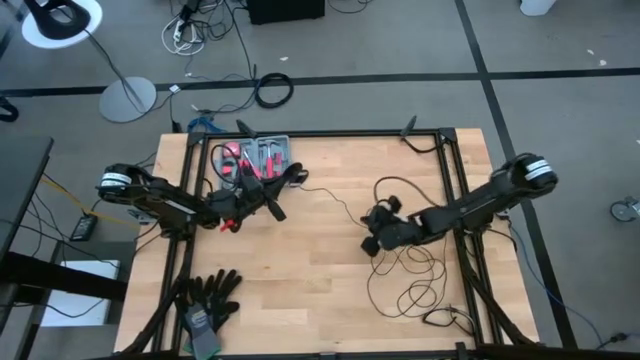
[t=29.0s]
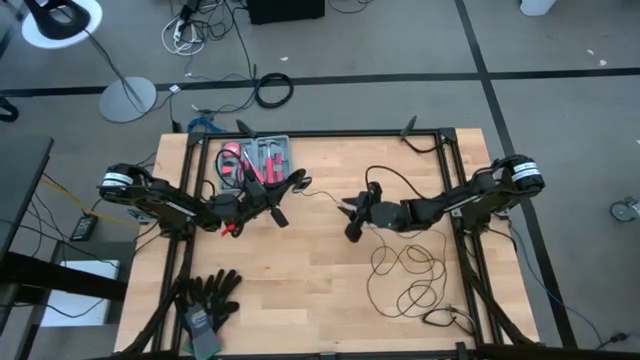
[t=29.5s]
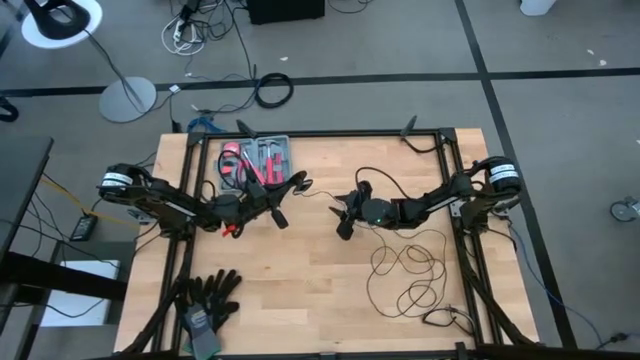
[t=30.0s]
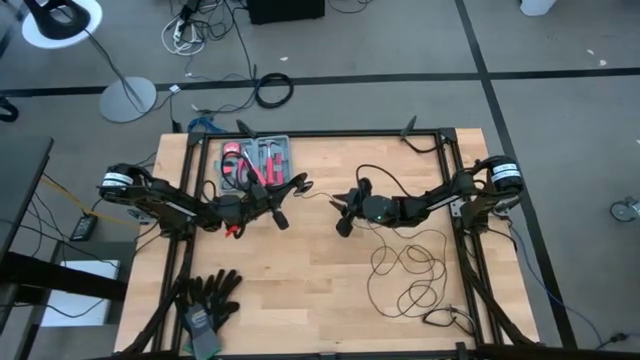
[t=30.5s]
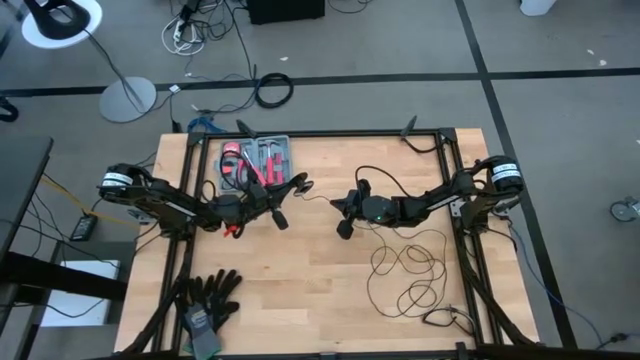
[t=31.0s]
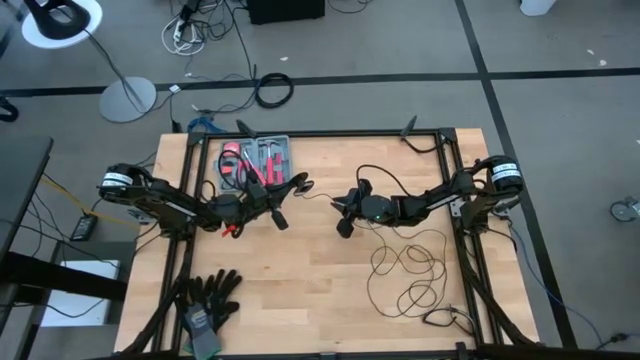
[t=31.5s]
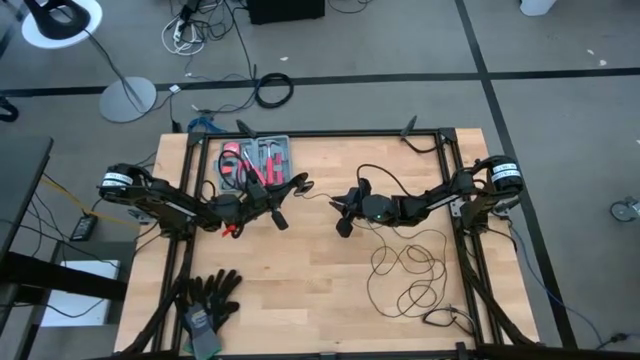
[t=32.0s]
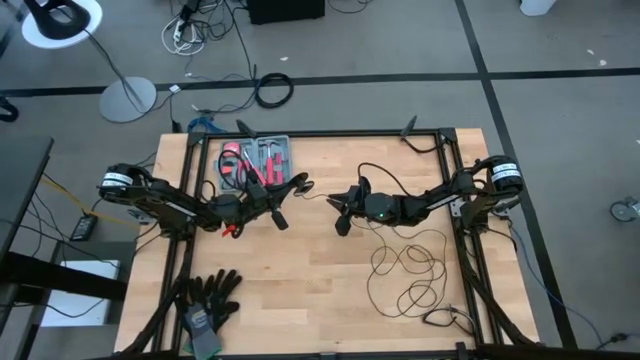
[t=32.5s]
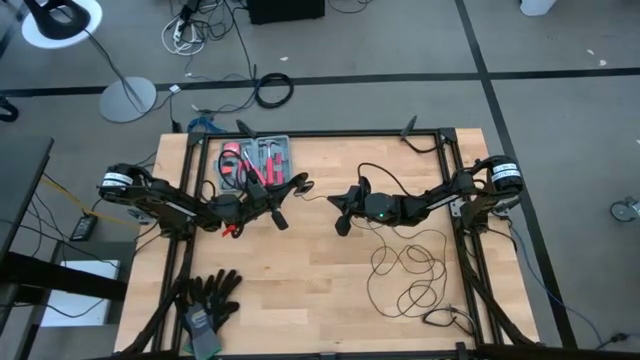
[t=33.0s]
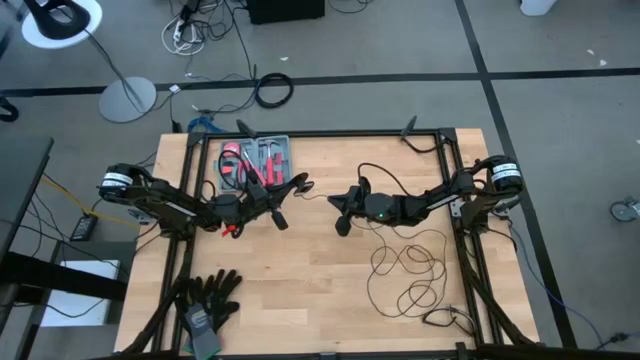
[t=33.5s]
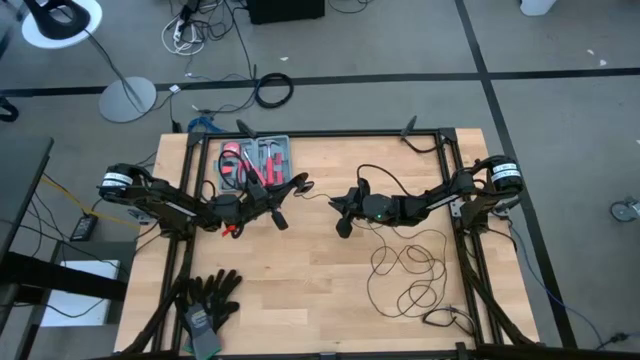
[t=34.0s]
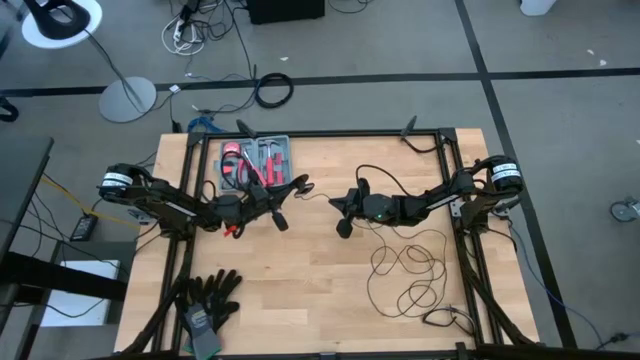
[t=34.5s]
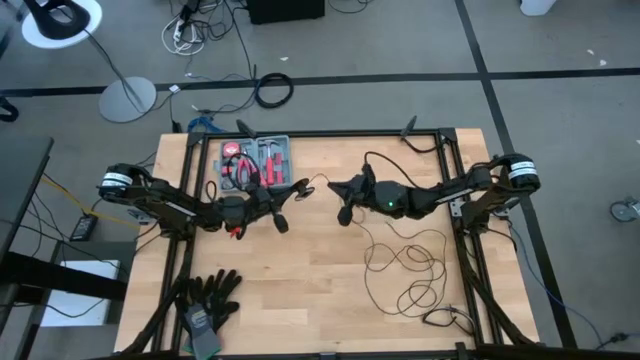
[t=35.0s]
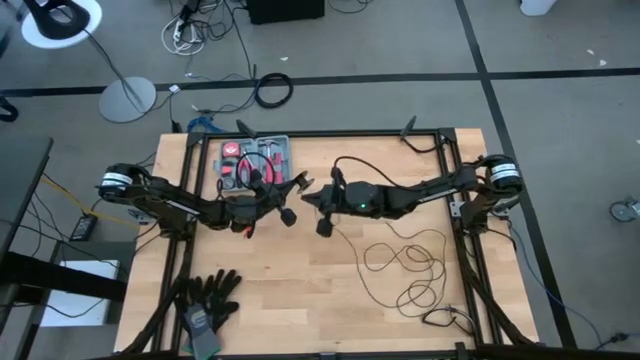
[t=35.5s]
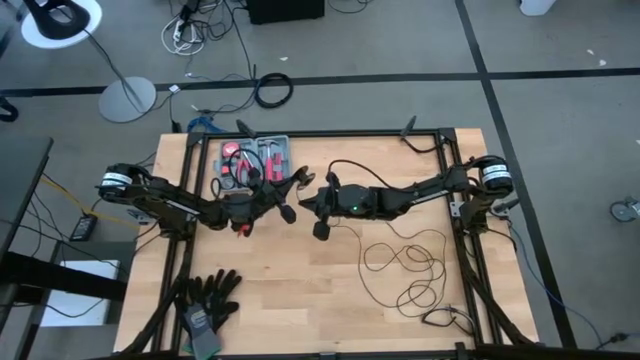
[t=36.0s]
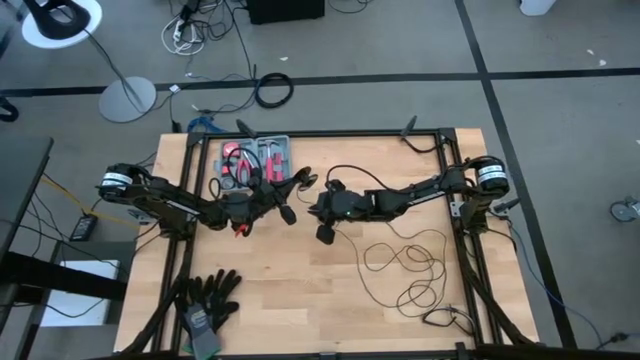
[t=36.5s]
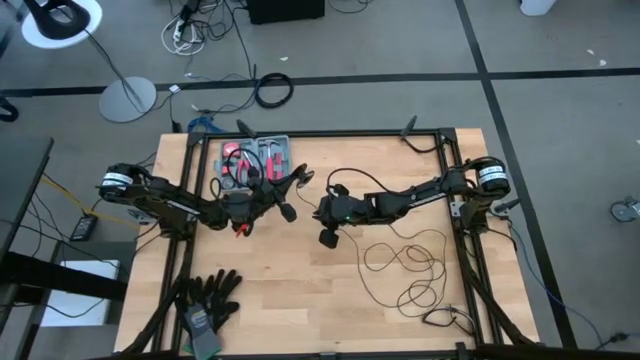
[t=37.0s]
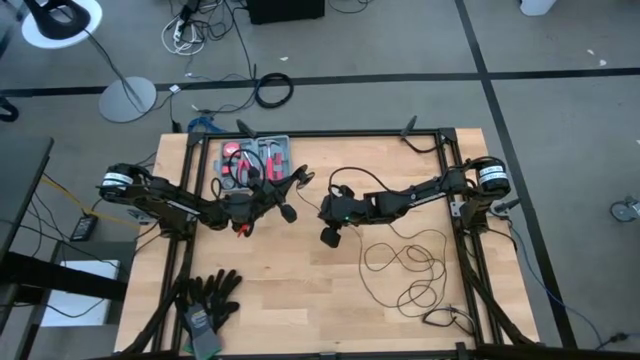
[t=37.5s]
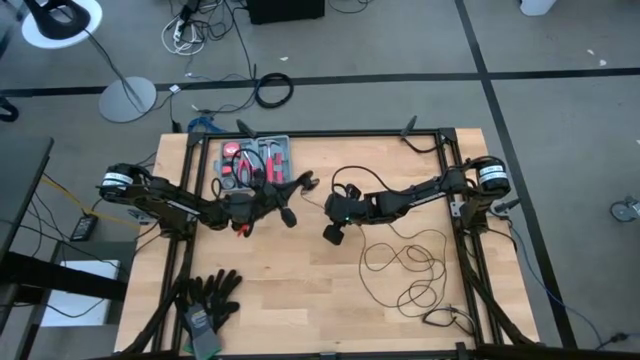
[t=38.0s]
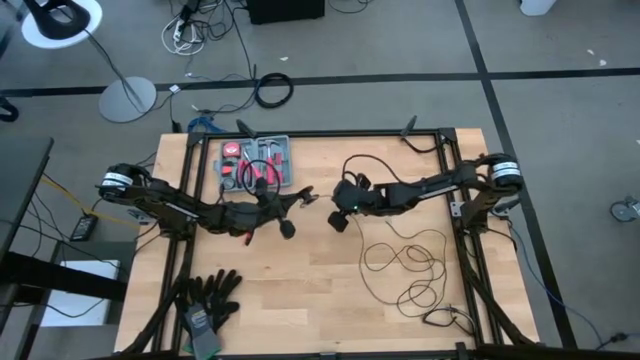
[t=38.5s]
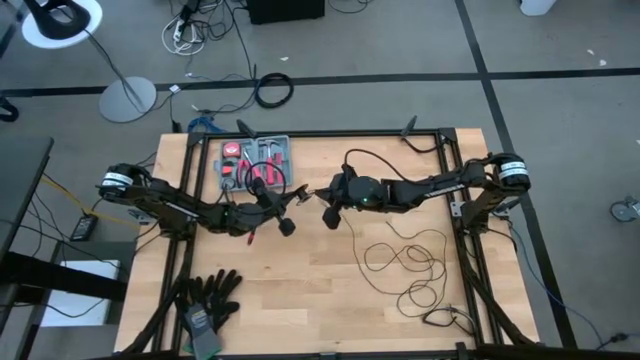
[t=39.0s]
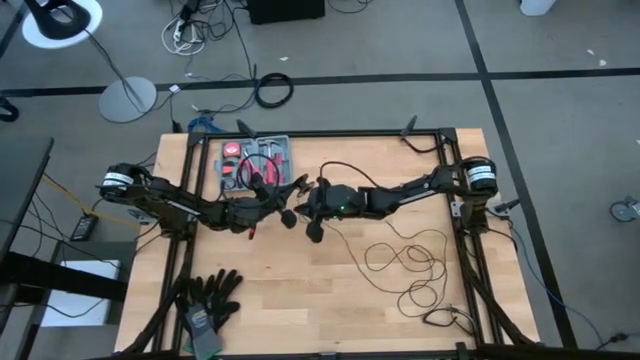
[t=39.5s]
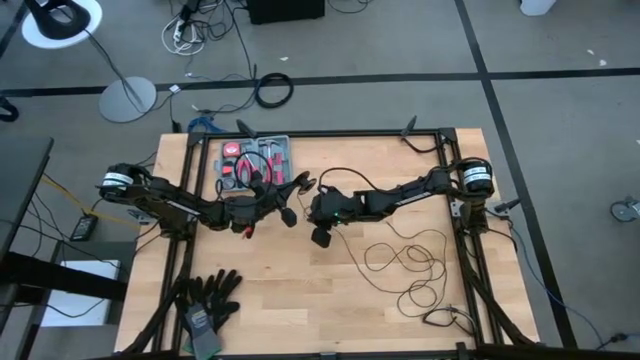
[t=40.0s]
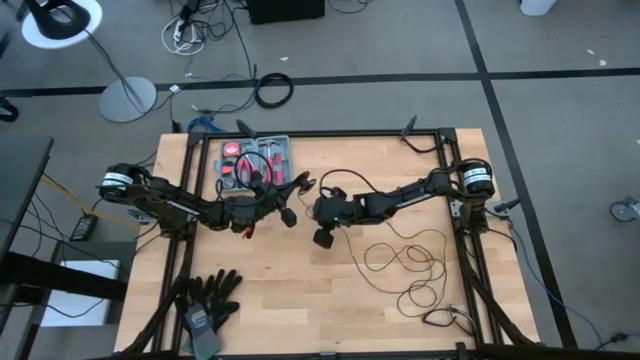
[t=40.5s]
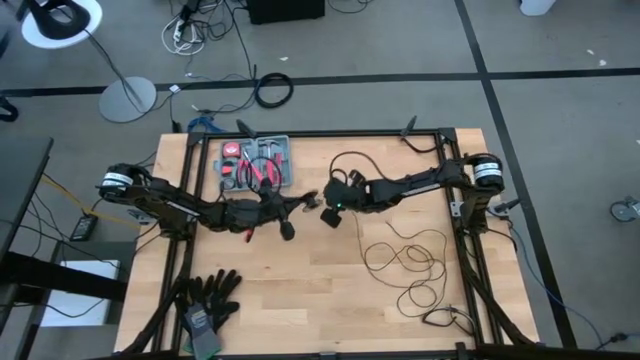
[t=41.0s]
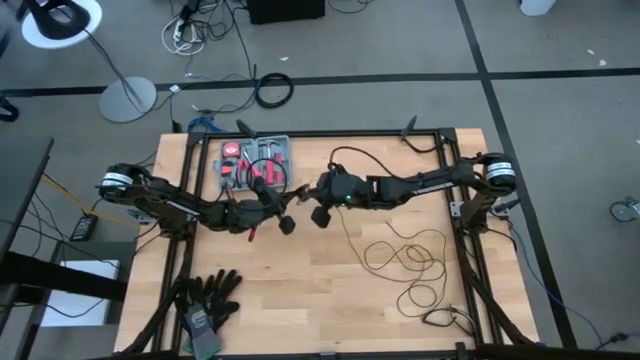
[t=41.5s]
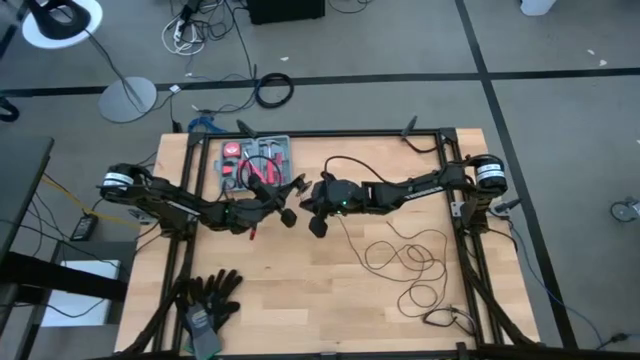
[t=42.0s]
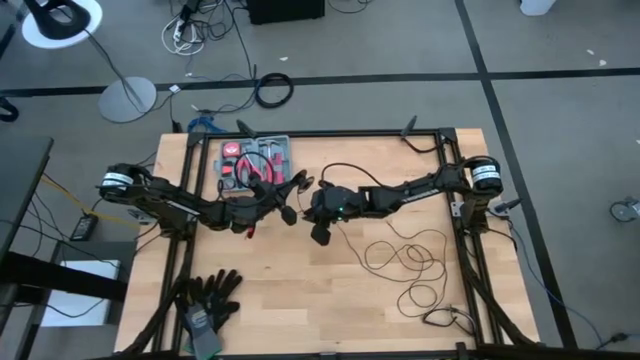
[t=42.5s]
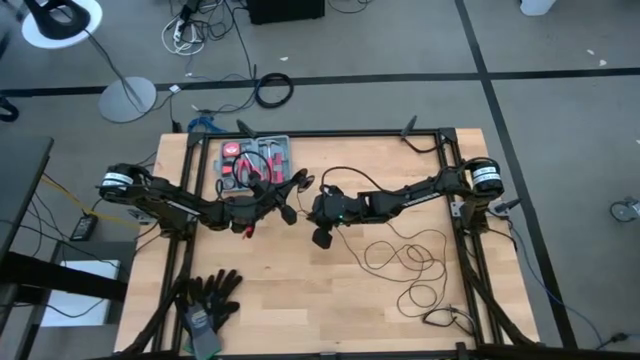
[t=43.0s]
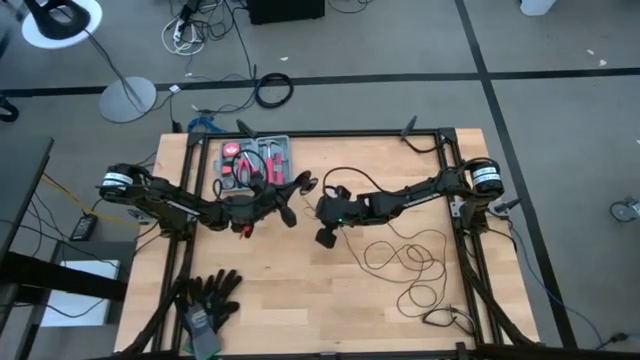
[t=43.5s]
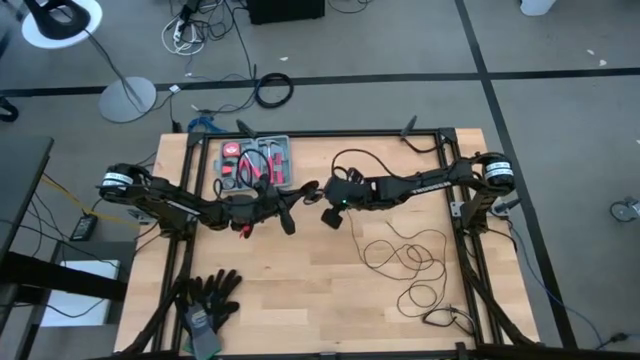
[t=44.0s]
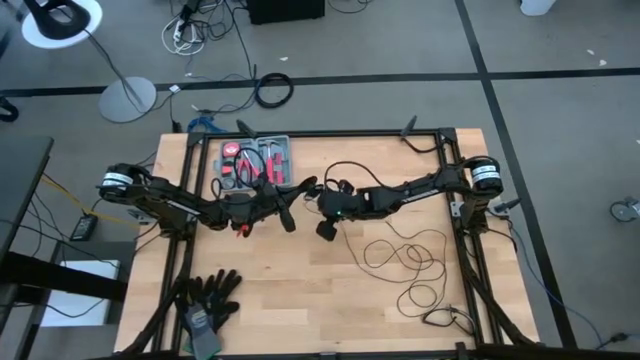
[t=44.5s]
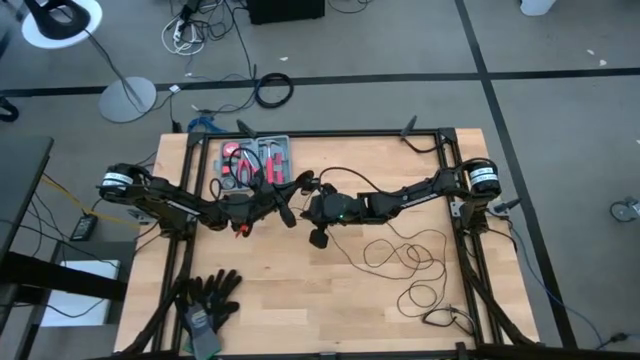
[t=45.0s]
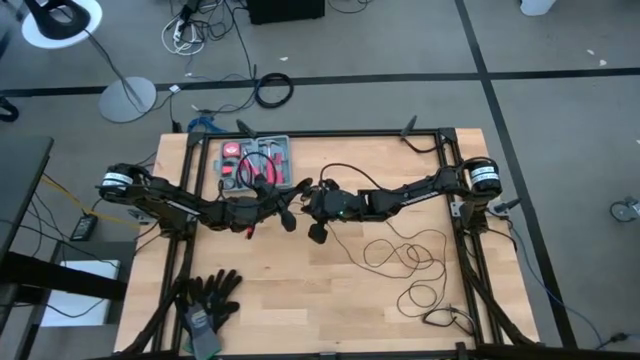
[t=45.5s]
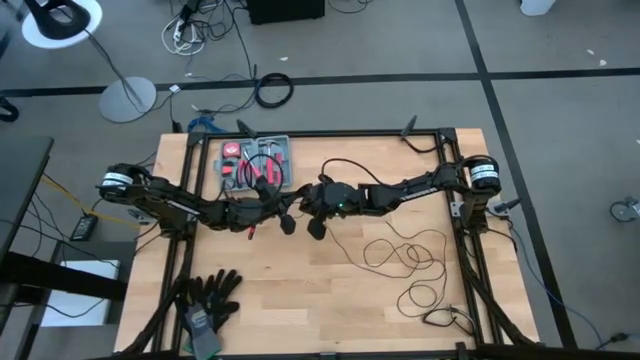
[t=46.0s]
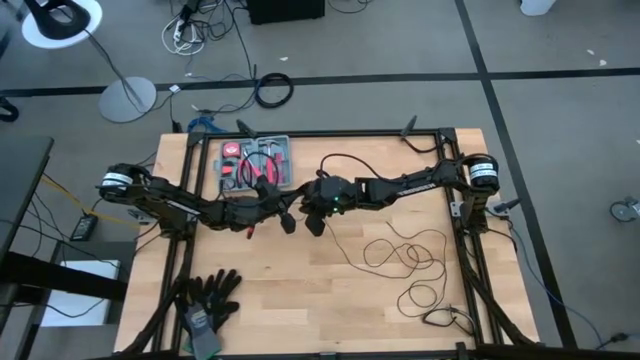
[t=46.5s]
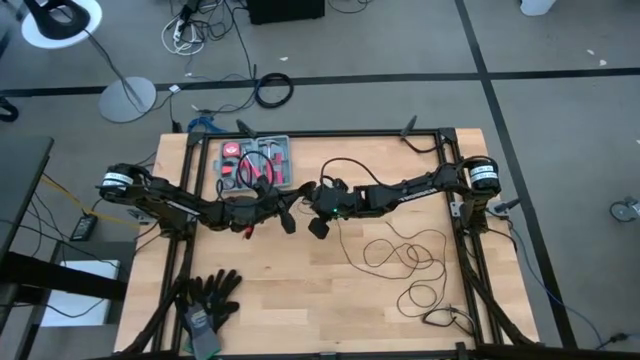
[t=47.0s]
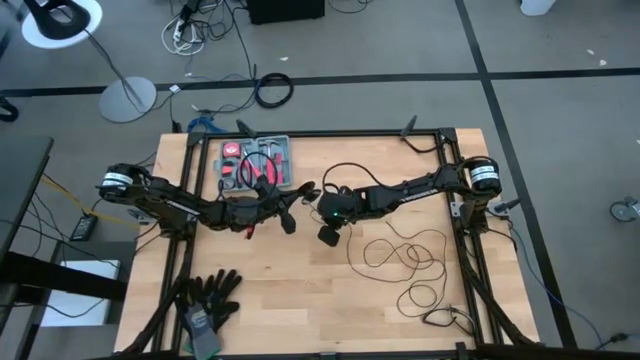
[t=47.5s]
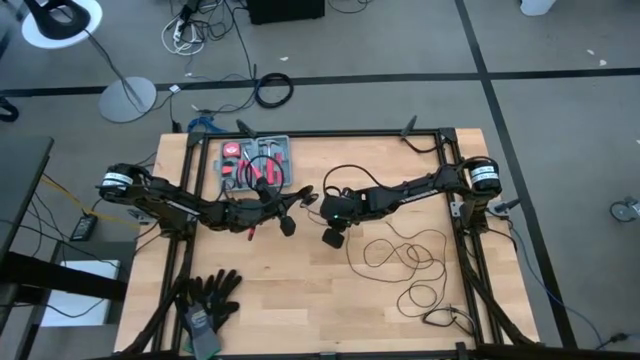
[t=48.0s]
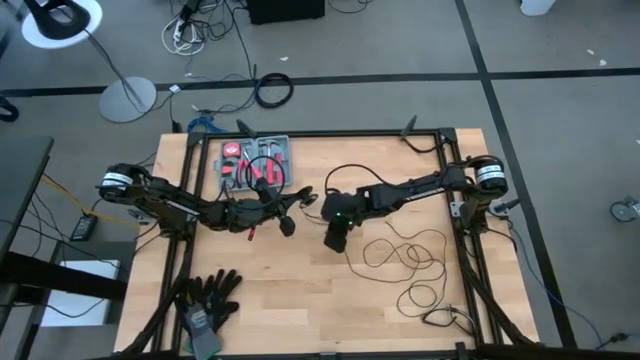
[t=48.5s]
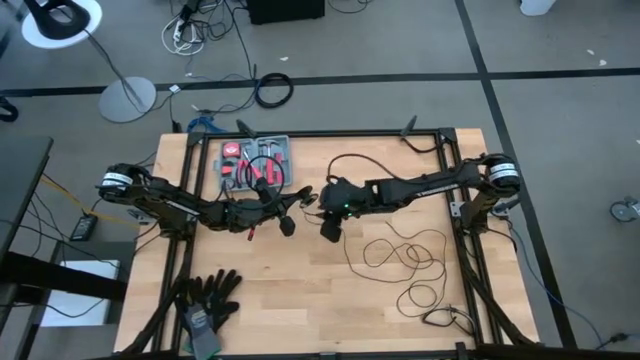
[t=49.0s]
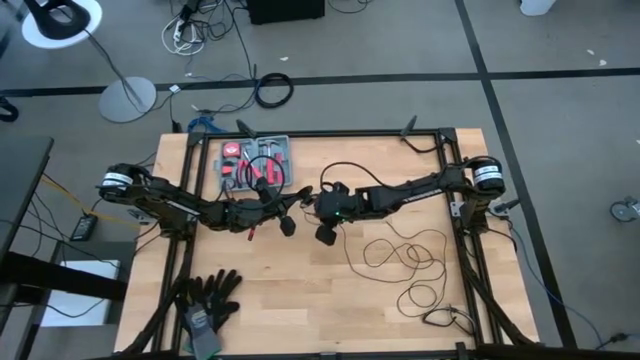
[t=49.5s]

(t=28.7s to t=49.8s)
Task: Coil cords
Coil the black cable wire on the spool
